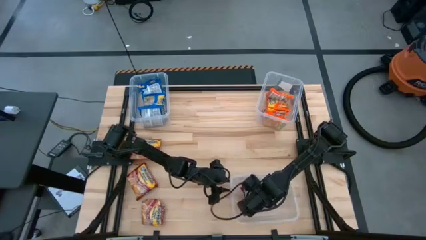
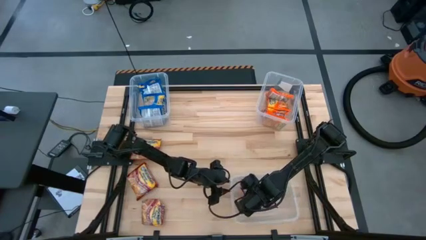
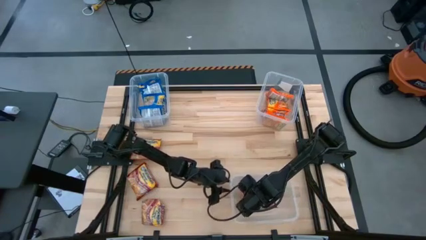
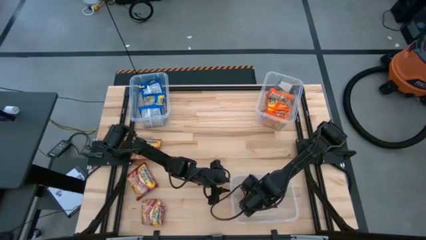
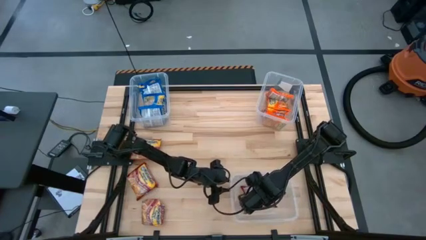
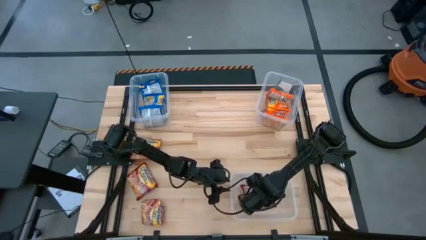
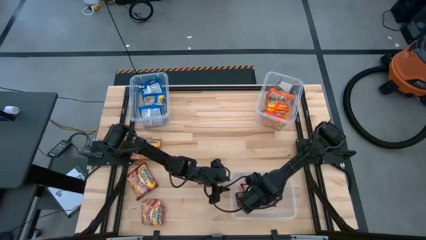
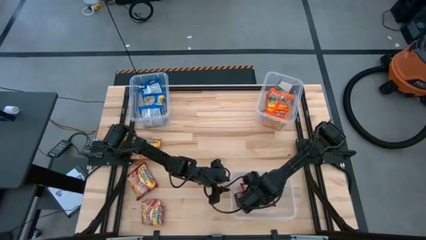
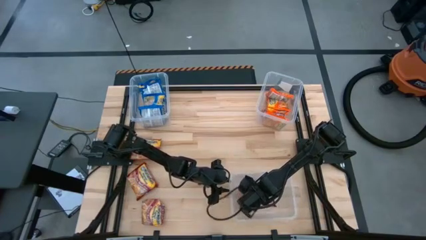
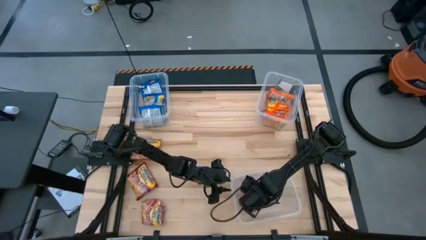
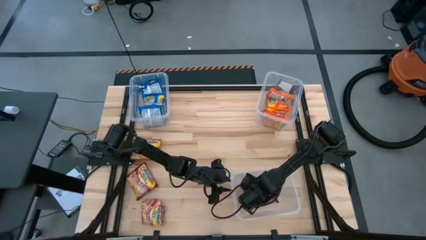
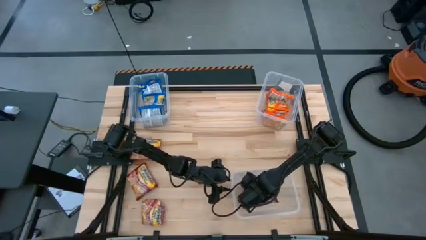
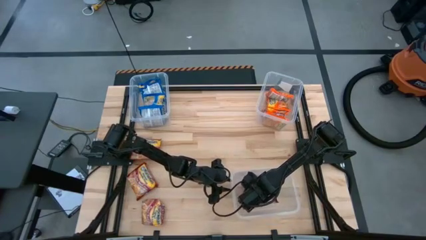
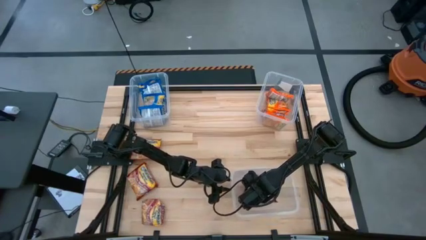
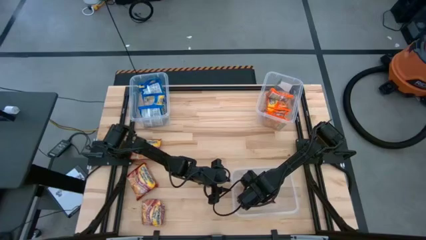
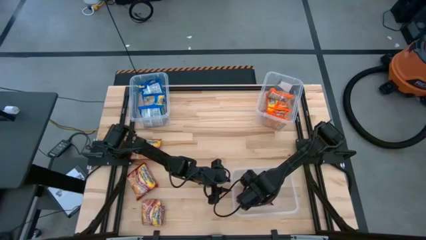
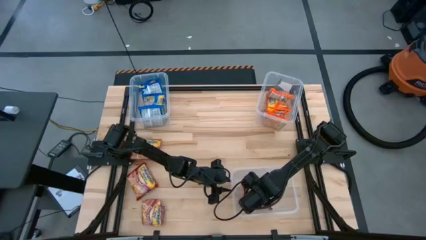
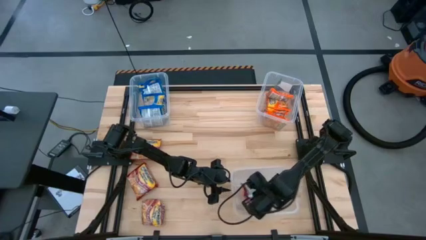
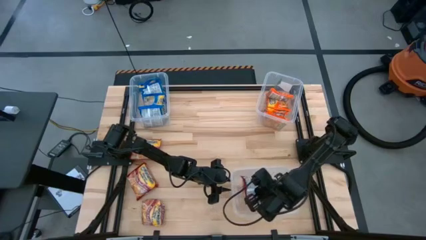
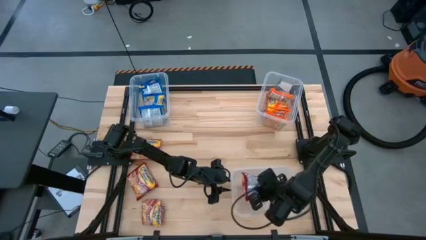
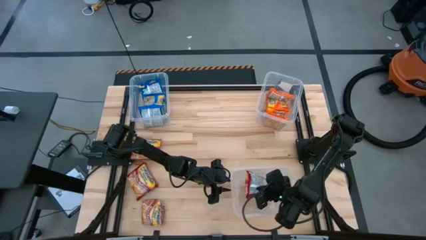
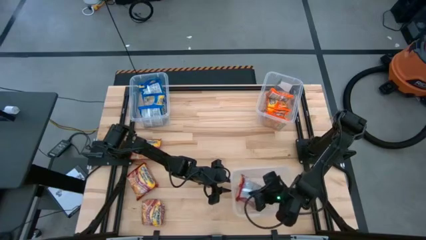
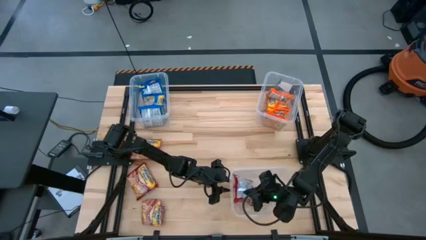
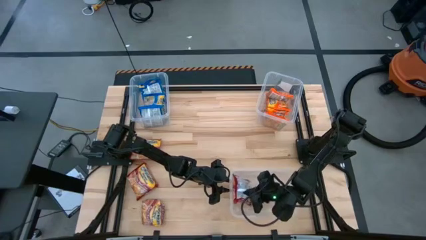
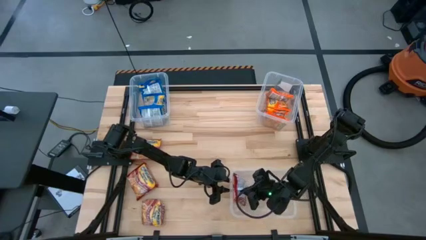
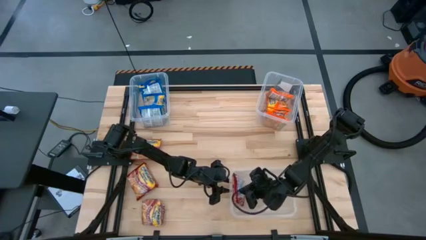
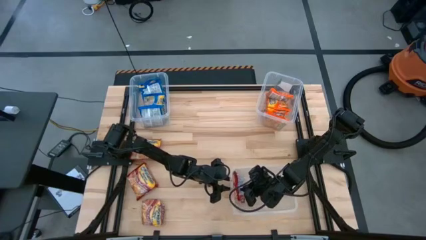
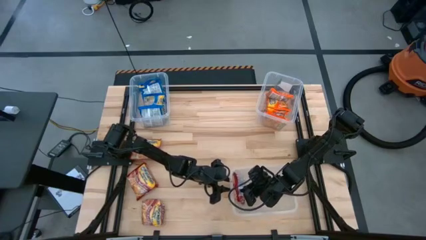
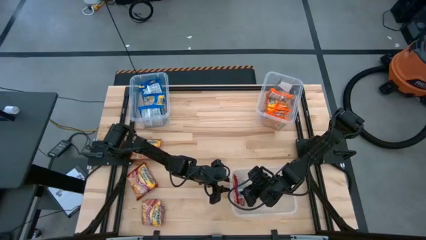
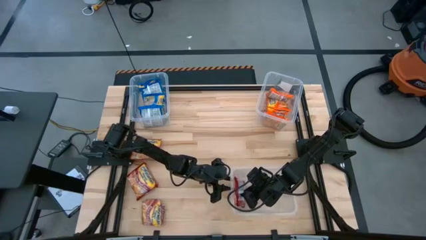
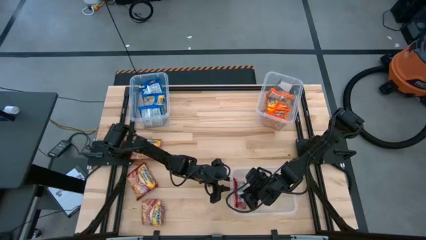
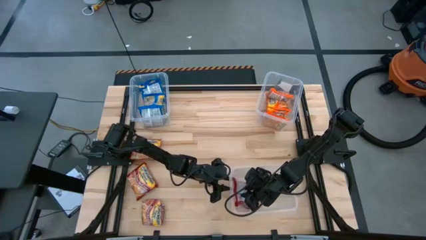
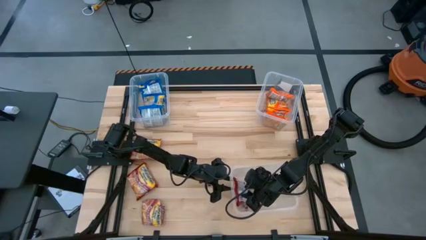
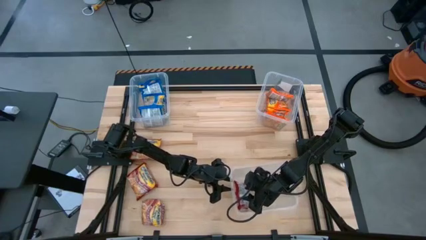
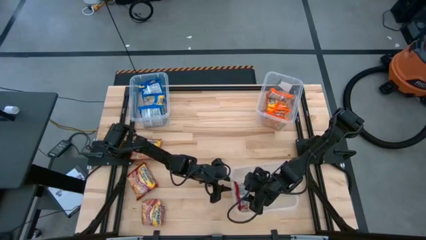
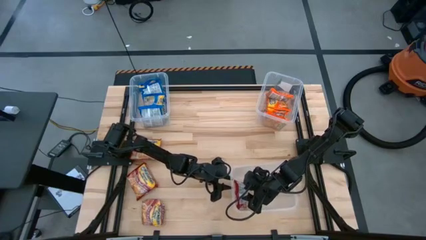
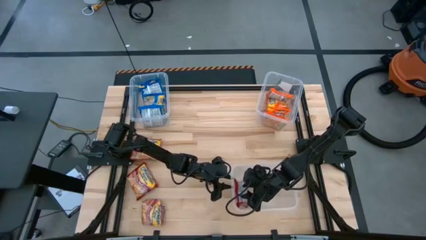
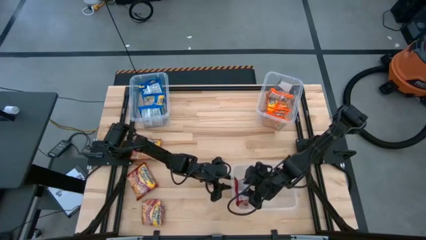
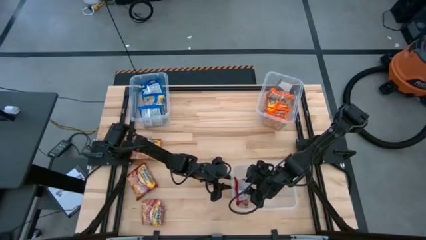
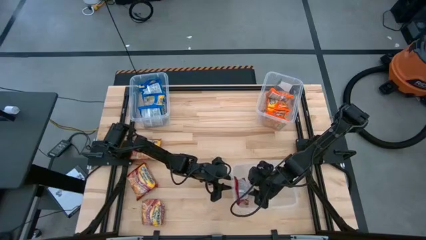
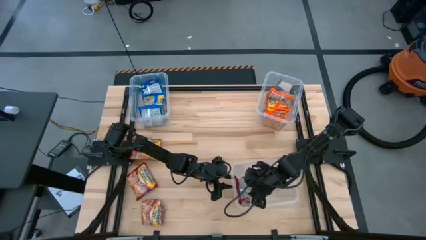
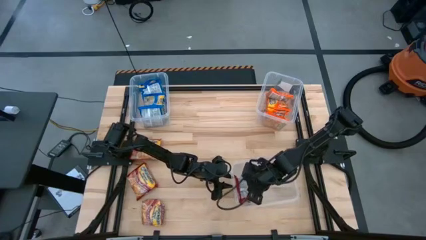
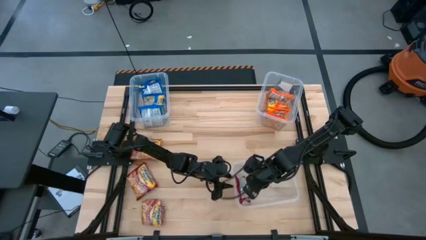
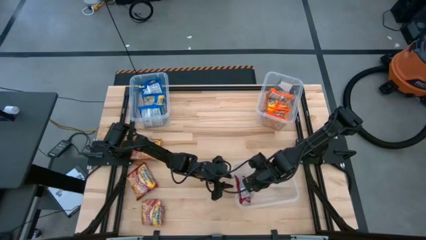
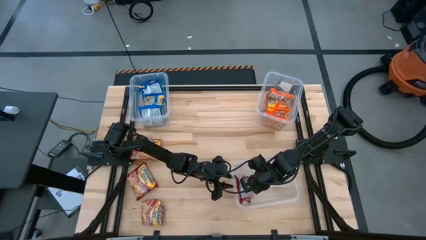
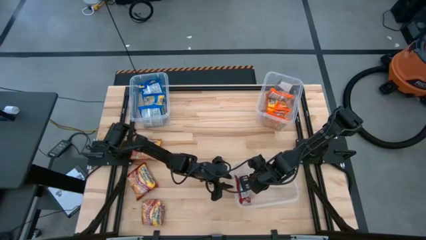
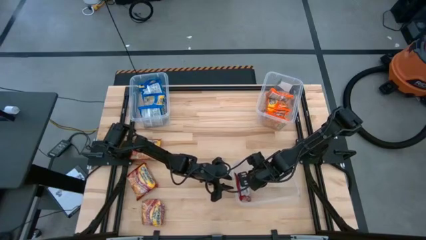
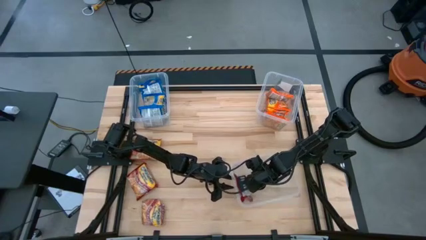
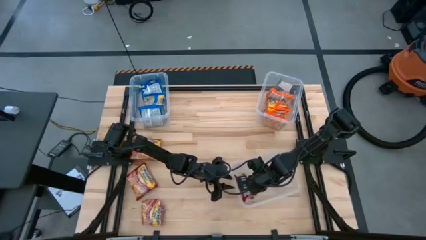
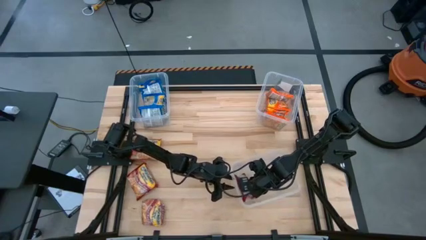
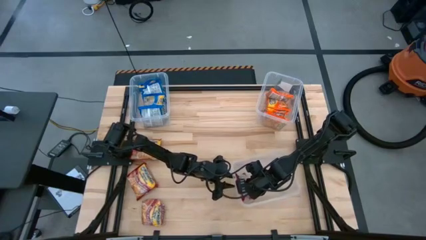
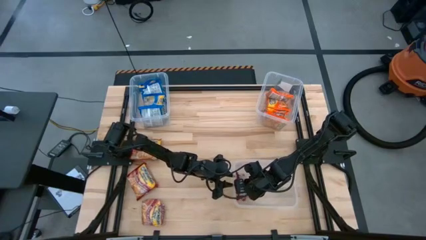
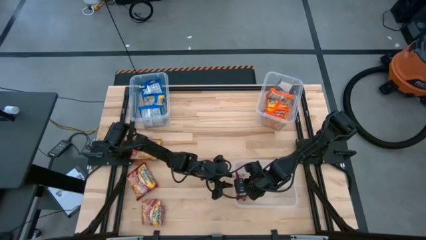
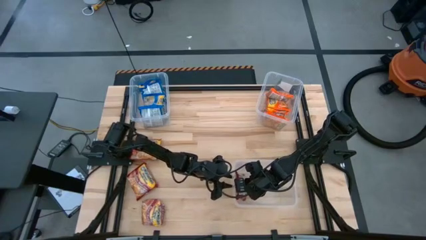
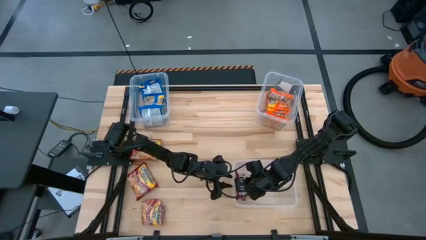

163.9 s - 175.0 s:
Task: Sort Maruchan noodles
Put the red noodle pack into the bottom transparent bin
